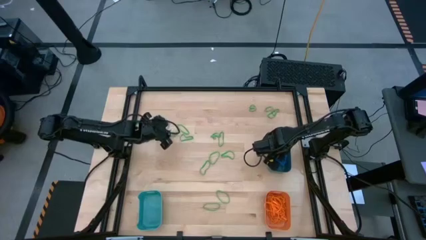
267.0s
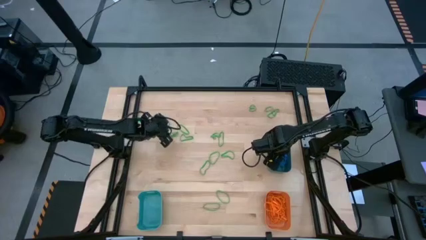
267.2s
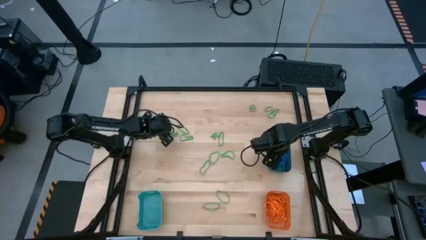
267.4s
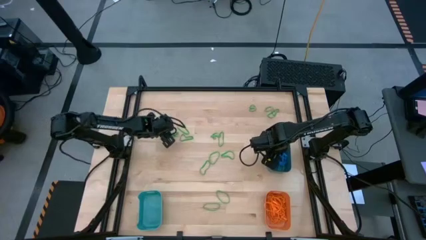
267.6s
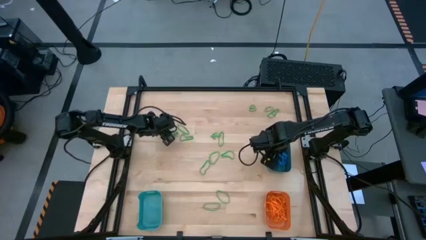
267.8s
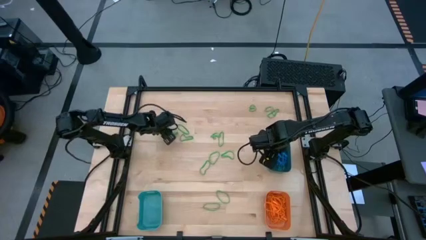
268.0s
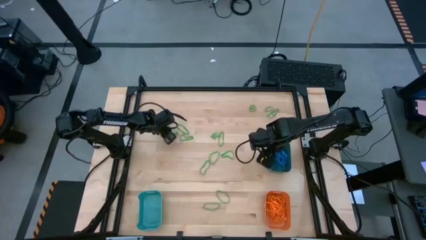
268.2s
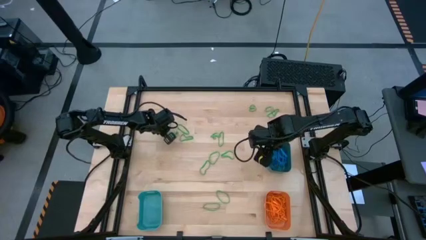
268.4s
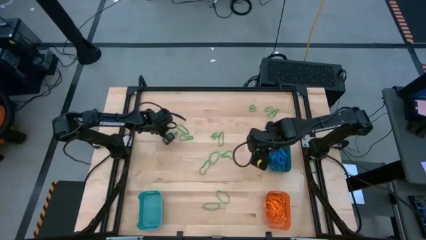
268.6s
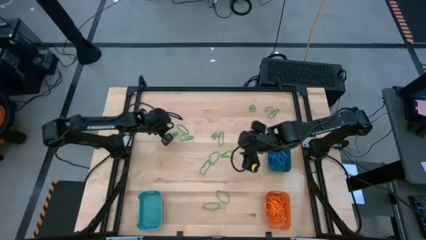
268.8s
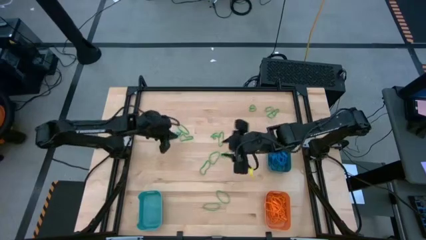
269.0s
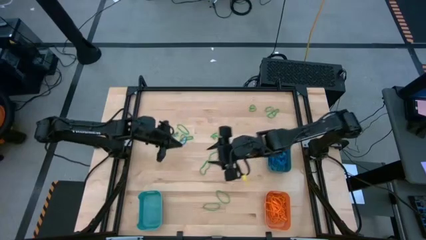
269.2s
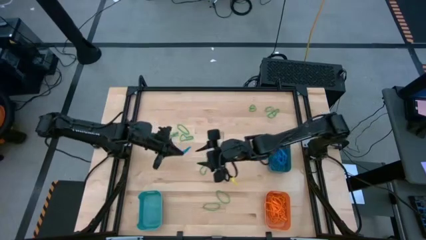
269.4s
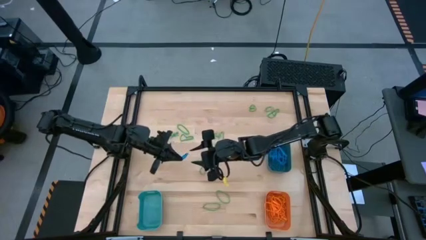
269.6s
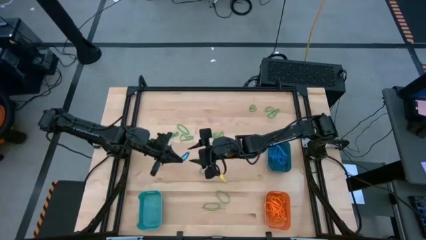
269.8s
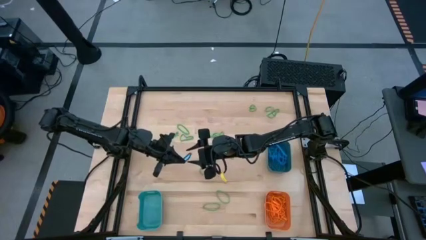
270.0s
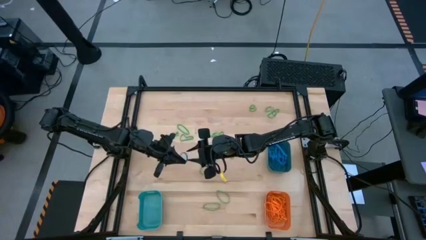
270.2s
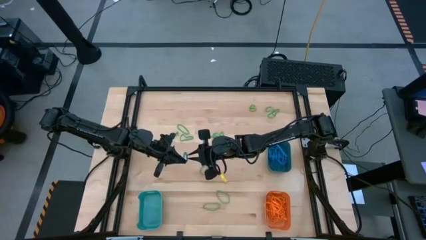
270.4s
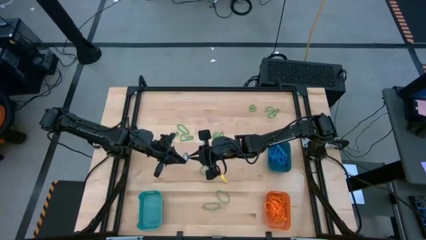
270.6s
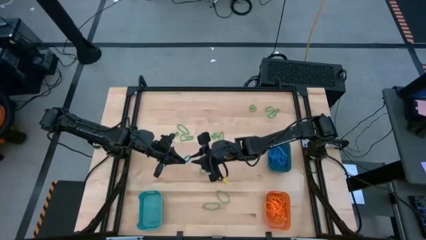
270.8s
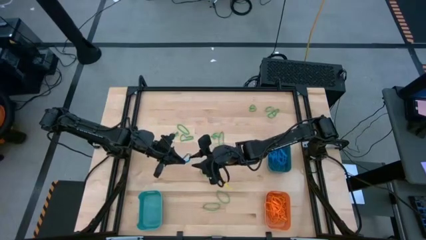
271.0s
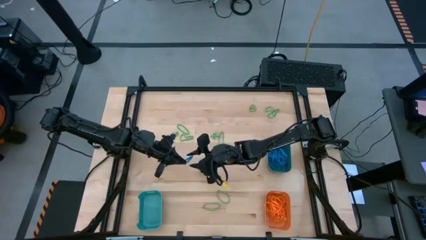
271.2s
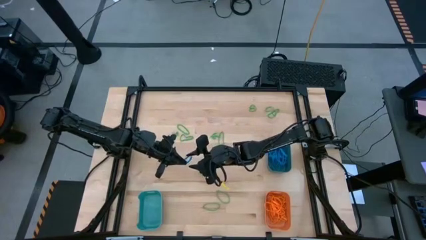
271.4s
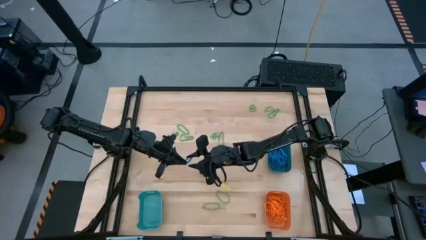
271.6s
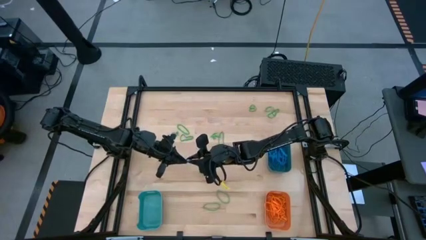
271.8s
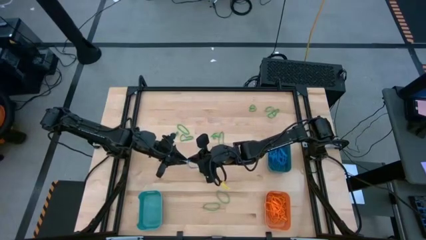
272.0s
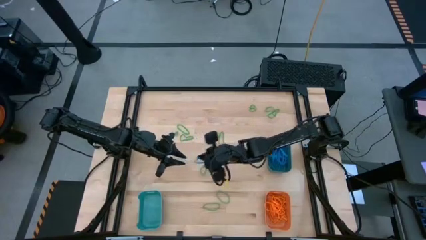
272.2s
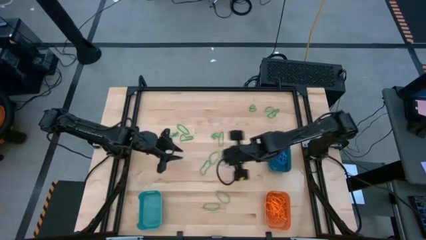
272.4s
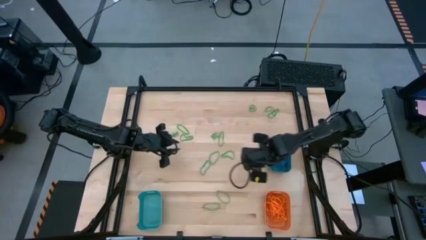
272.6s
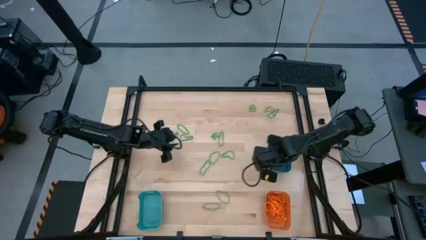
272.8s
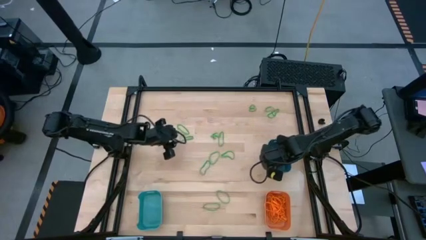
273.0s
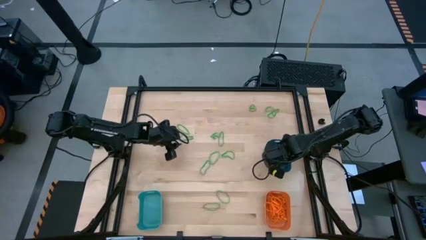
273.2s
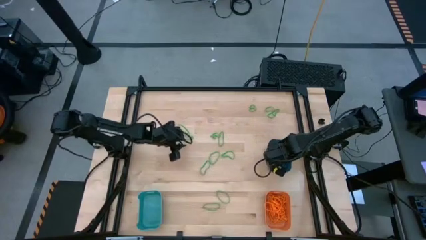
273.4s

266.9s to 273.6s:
Task: Sort rubber bands into baskets
Put the blue rubber band into the dark blue bin

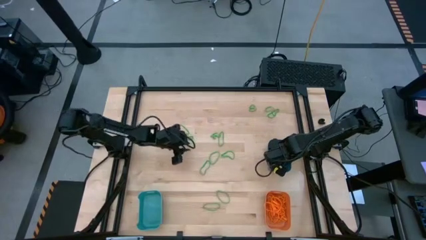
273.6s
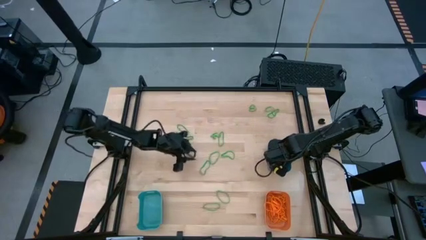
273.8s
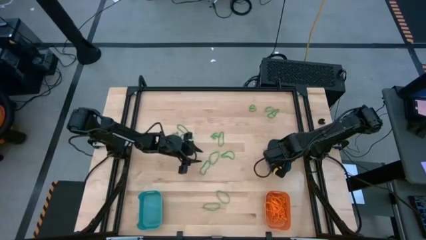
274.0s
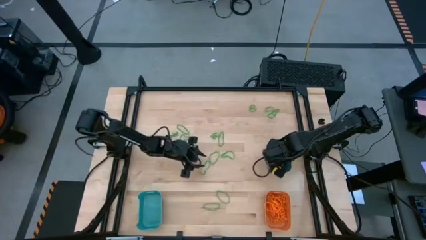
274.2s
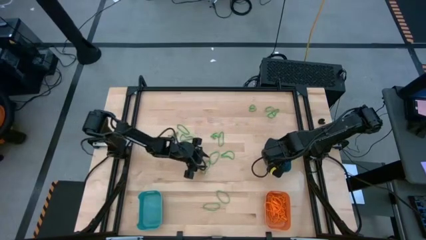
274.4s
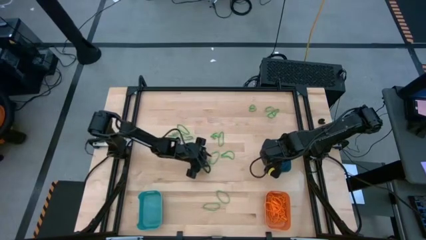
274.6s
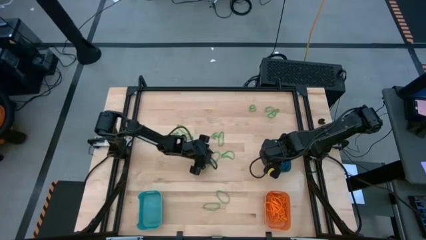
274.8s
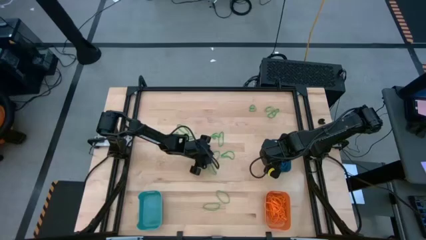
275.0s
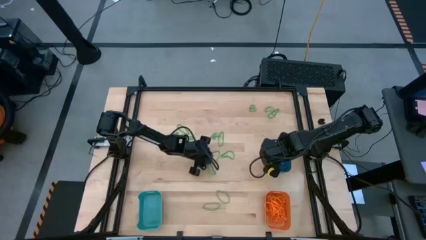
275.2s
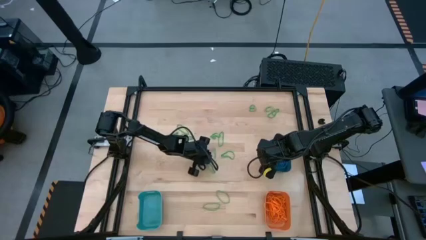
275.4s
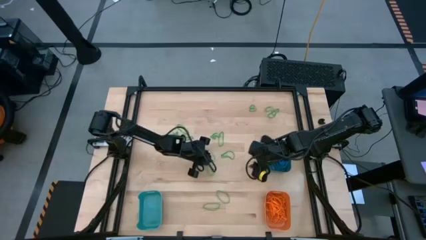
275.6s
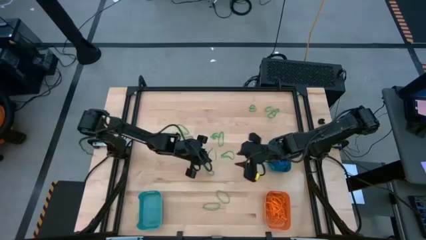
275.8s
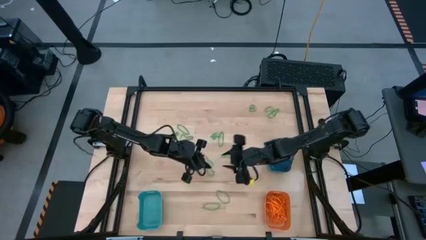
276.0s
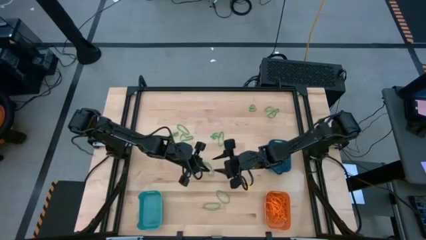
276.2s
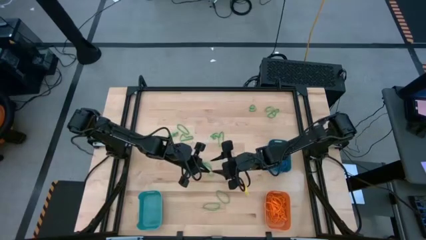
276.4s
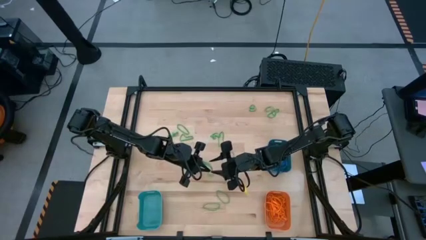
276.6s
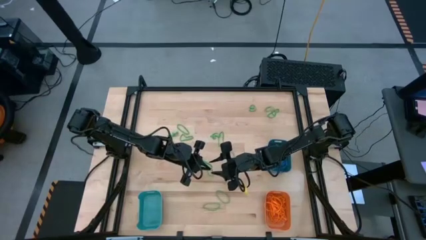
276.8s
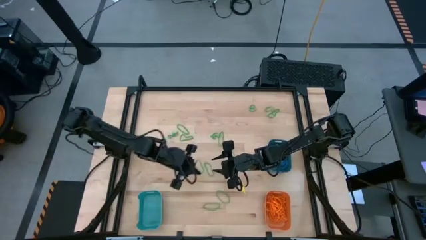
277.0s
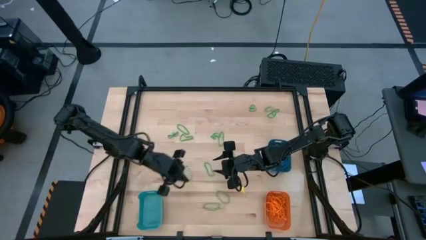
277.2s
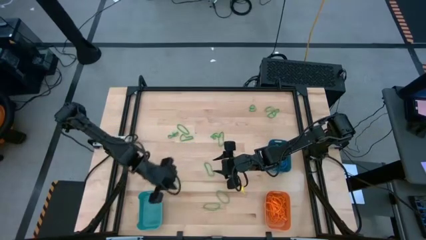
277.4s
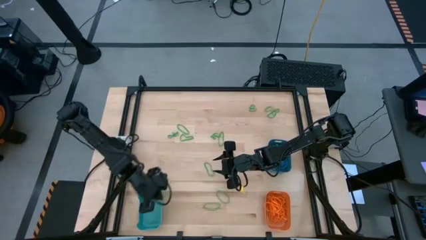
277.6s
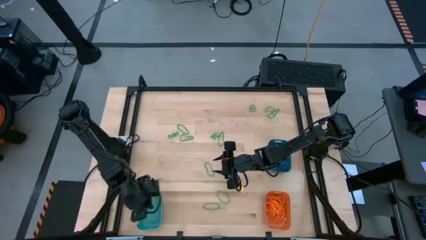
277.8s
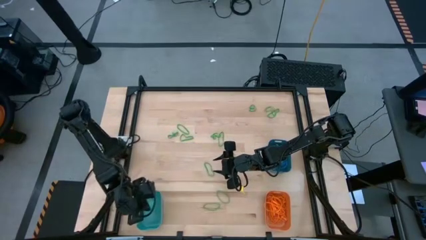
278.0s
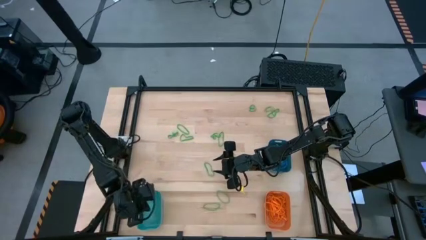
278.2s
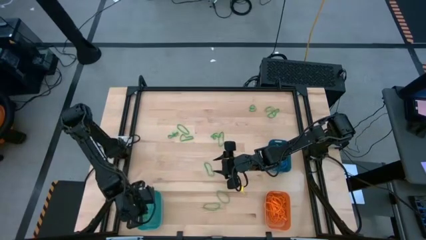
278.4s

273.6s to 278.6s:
Put the green rubber band into the green bin

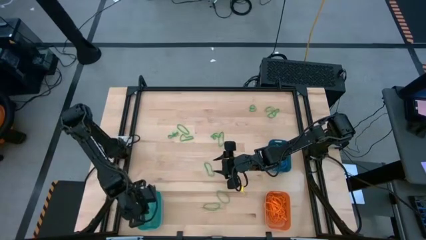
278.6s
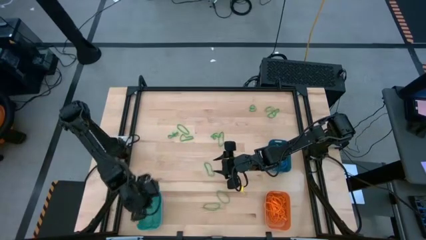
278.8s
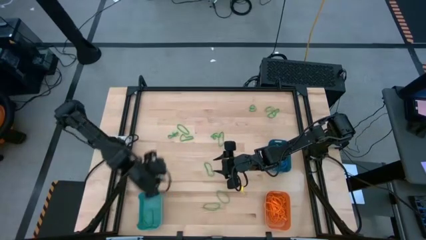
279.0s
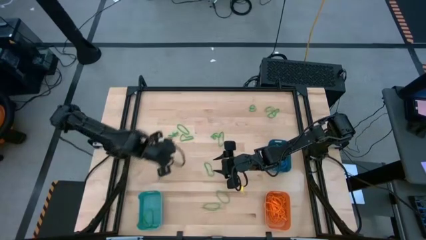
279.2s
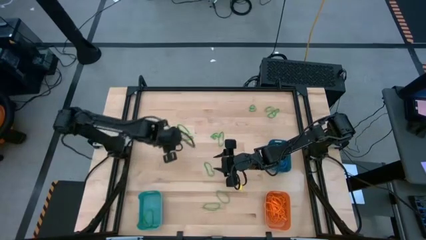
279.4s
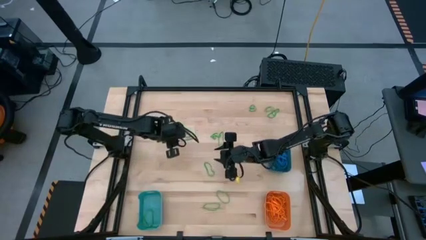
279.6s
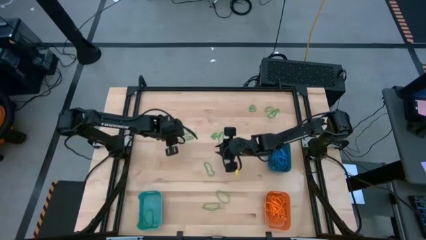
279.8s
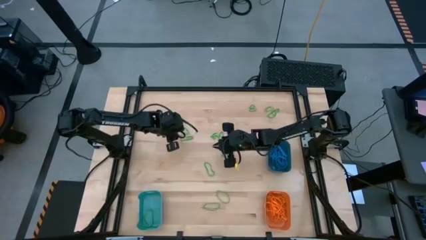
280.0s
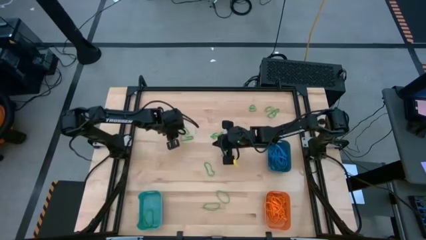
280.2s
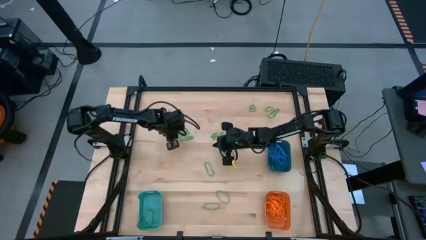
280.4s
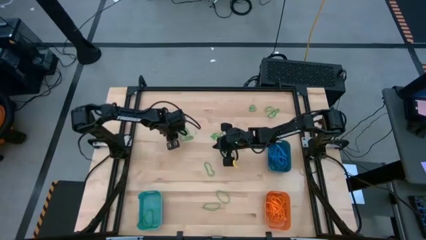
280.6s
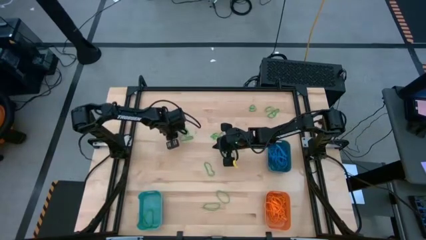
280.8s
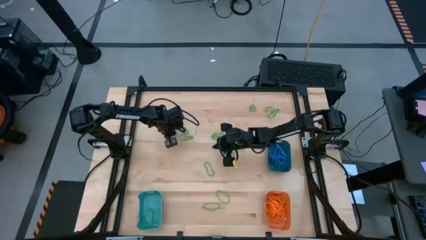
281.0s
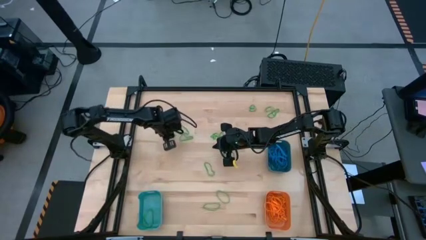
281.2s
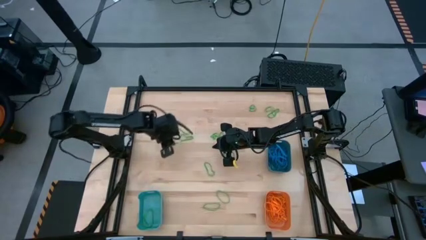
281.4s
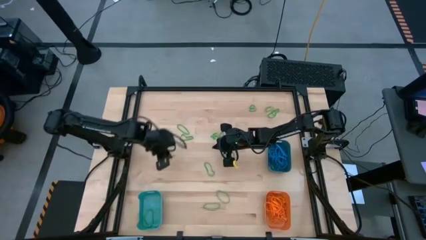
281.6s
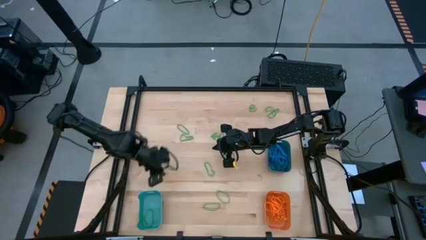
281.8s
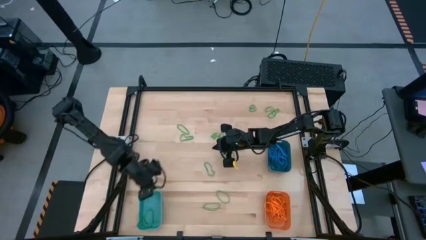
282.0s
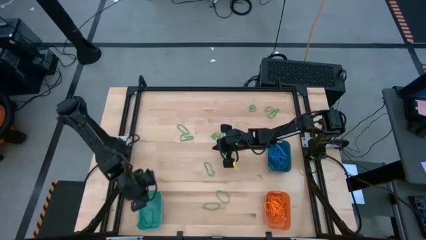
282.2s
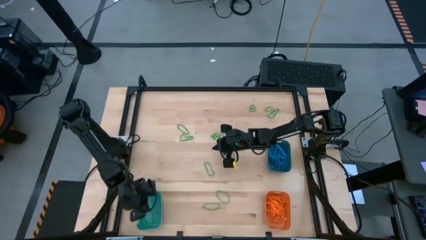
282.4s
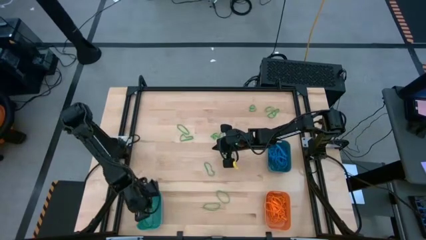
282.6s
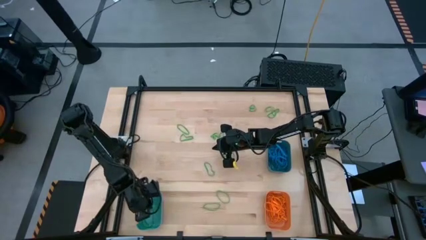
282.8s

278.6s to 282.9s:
Put the green rubber band into the green bin

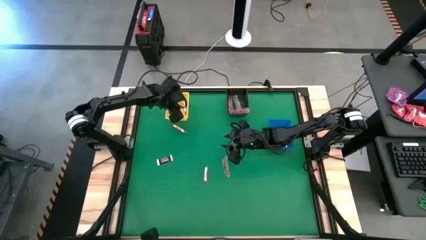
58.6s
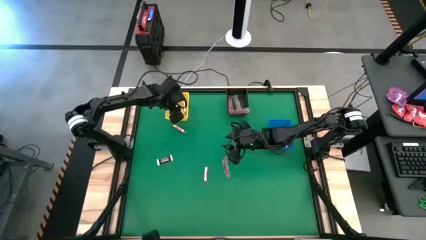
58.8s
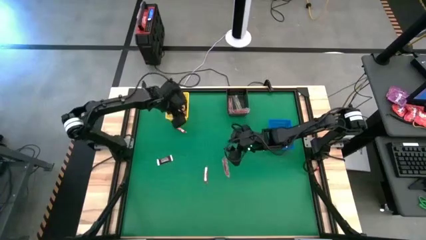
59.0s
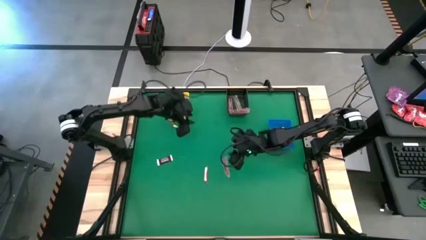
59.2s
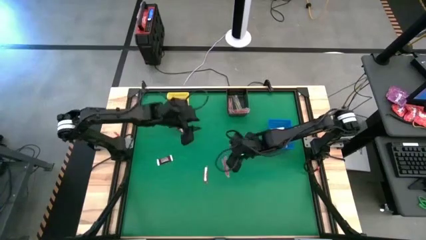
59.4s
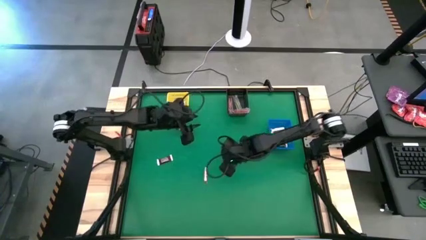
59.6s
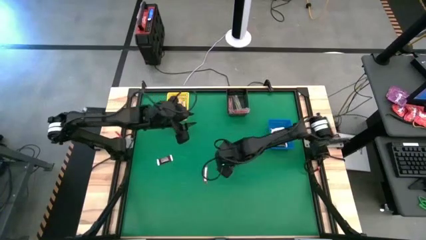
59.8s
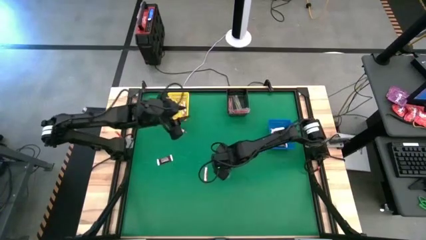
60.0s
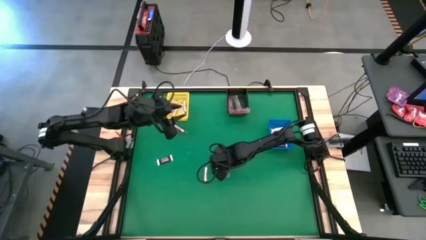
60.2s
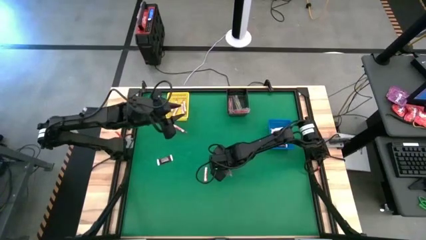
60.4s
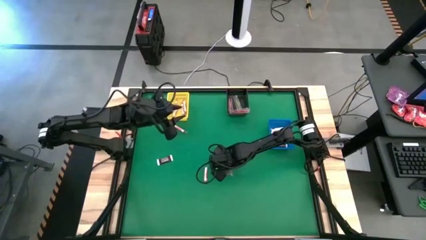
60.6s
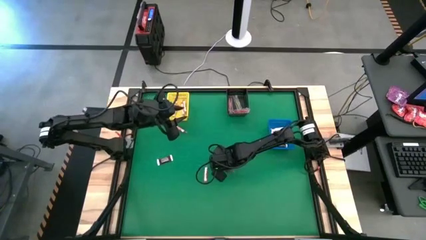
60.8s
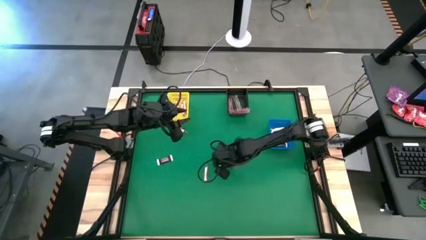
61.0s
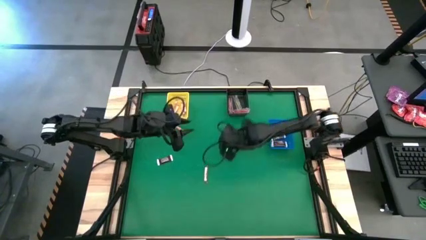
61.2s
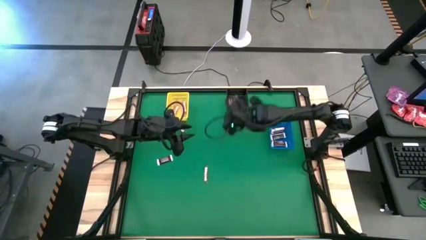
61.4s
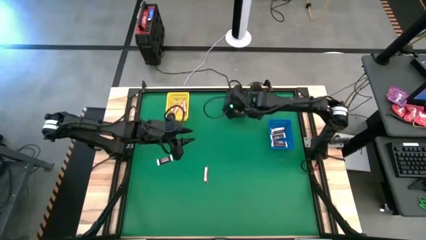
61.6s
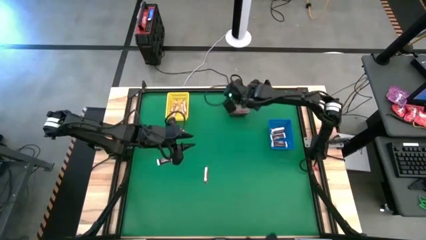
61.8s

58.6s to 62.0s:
Task: Sort candy by brand, put in halloween buckets
Put the red candy into the black basket
